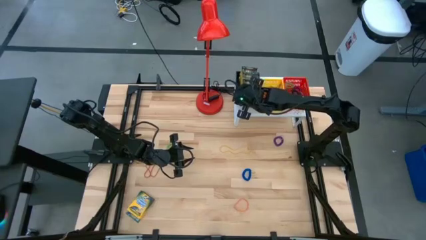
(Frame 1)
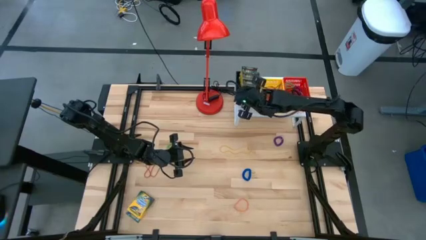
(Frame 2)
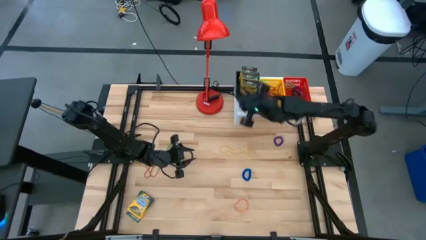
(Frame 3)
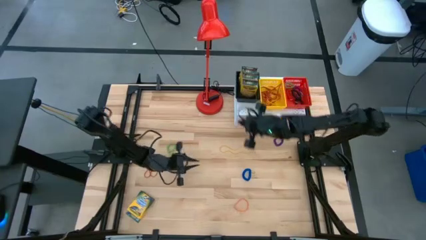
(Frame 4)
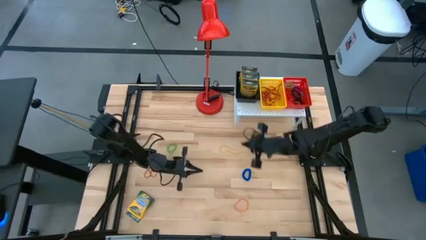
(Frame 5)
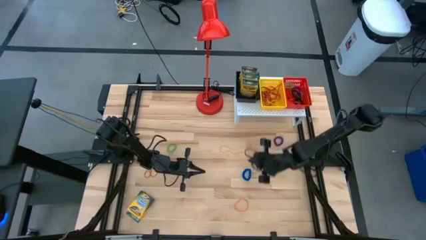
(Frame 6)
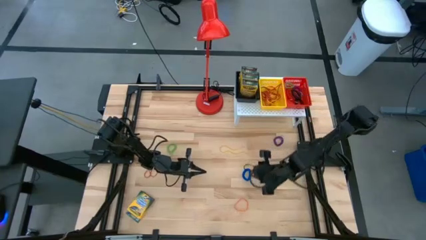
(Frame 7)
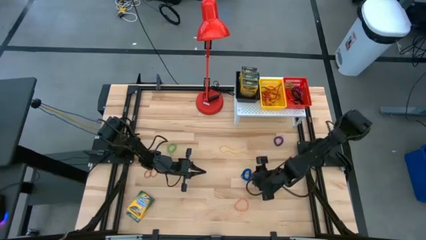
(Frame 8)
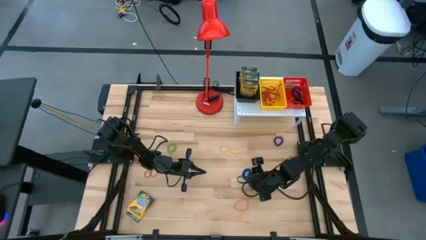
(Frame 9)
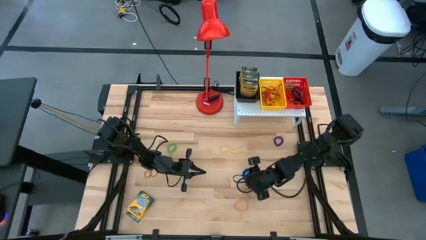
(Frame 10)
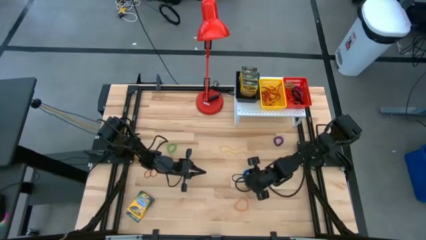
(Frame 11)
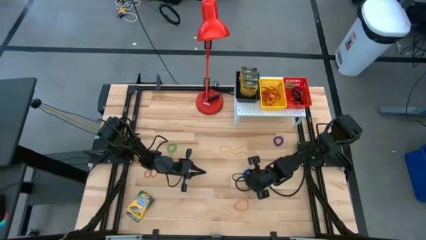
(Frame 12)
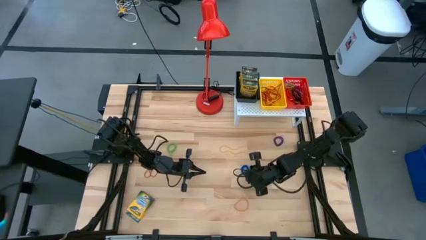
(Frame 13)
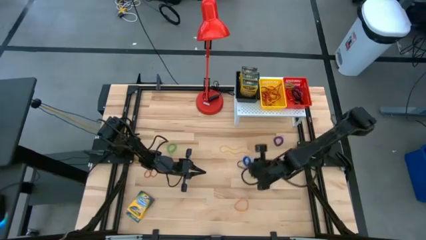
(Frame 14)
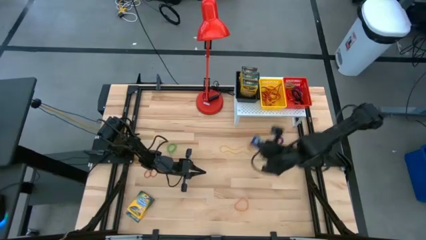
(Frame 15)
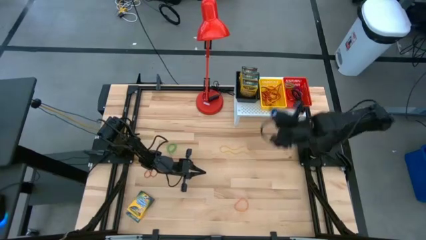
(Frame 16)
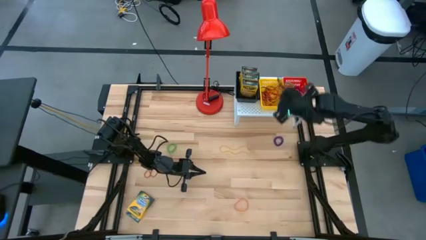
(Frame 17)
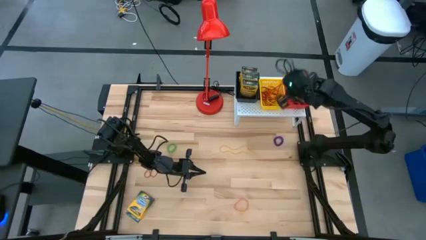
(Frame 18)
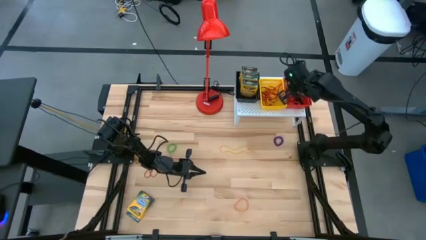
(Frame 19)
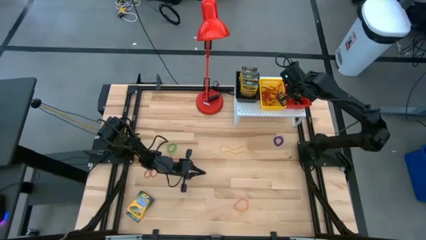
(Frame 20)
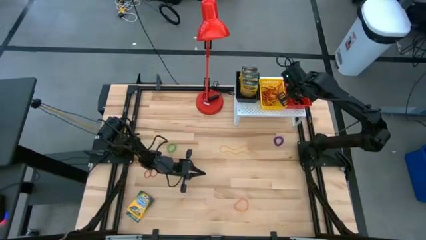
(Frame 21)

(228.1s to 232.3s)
Task: Pick & Place Office Desk Supplies
Put the blue spring keychain into the red bin

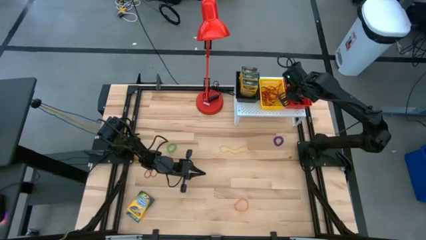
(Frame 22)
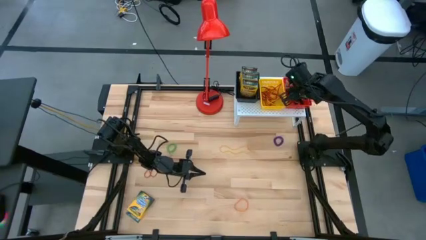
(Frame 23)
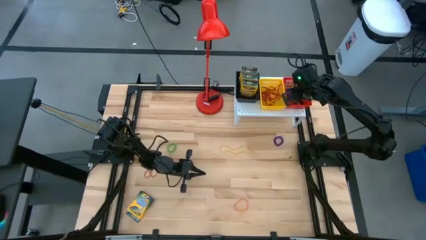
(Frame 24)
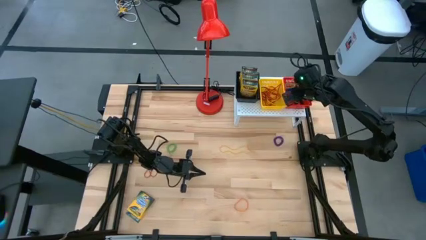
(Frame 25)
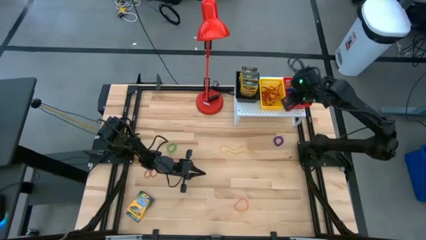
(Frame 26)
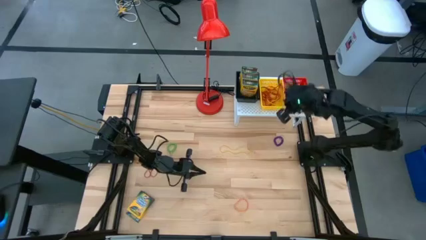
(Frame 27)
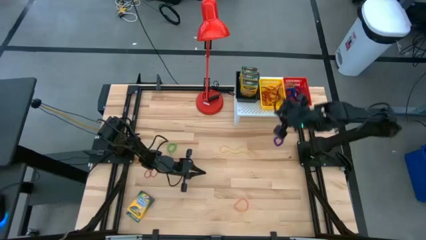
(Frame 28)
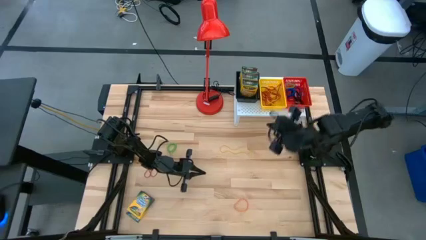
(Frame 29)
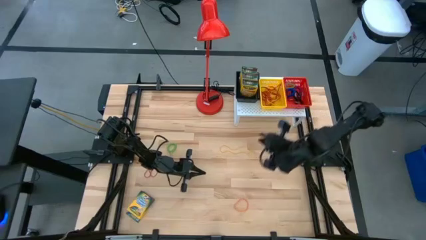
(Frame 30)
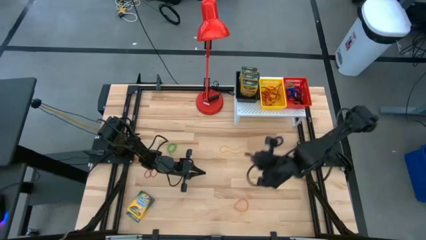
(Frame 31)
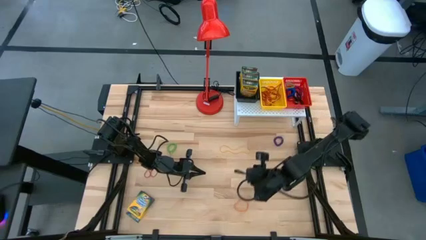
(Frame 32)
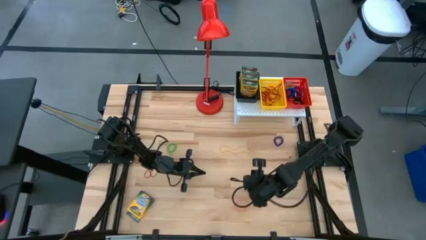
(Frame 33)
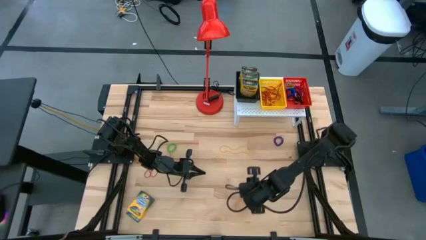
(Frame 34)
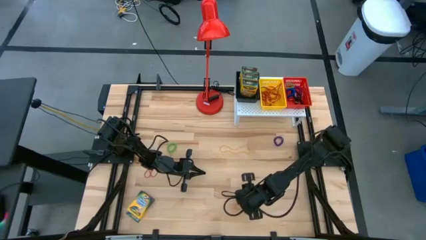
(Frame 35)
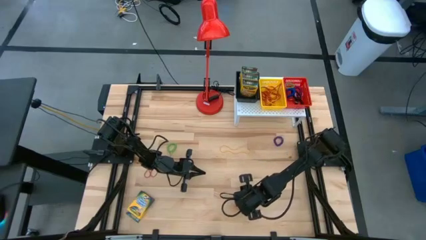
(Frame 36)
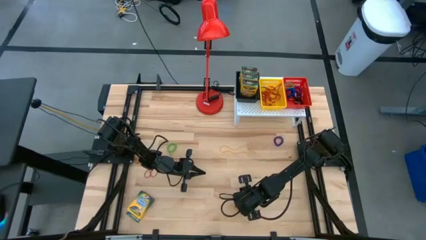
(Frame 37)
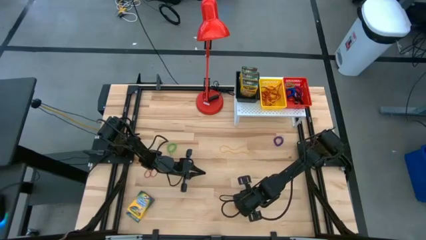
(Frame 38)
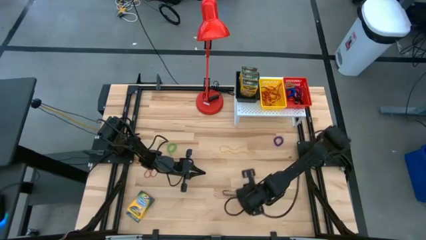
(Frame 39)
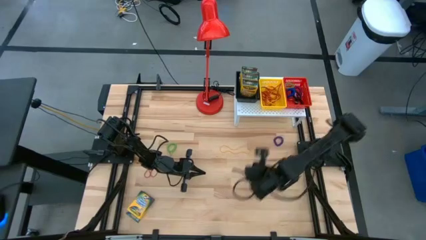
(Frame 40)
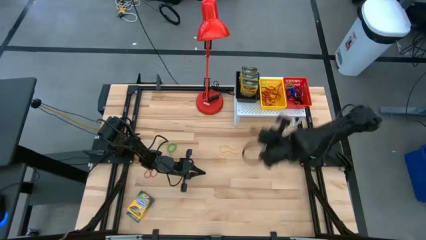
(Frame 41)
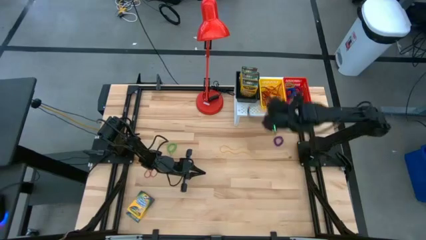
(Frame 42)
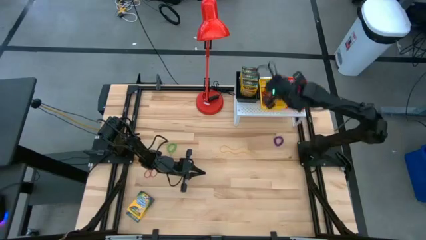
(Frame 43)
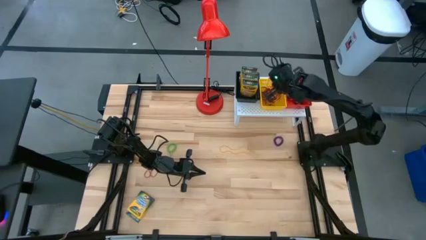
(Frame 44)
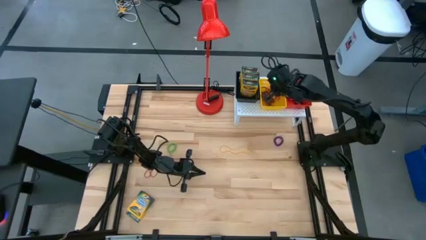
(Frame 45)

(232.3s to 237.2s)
Put the orange rubber band into the yellow bin

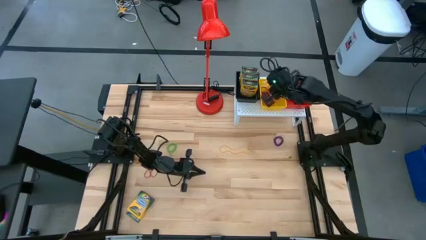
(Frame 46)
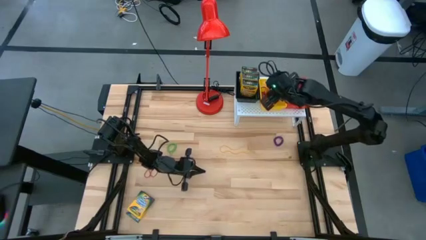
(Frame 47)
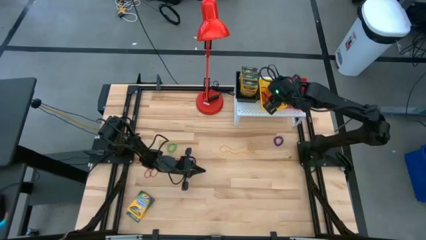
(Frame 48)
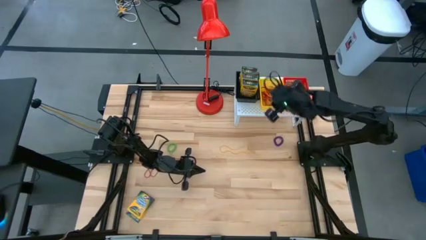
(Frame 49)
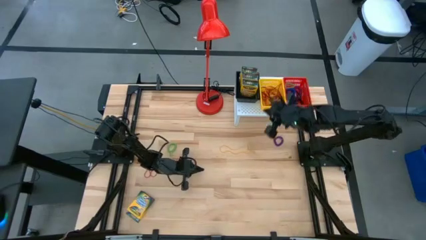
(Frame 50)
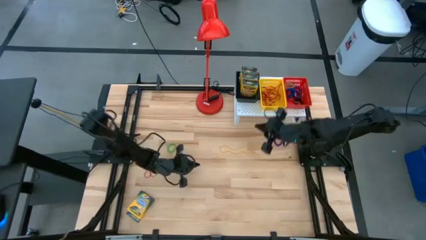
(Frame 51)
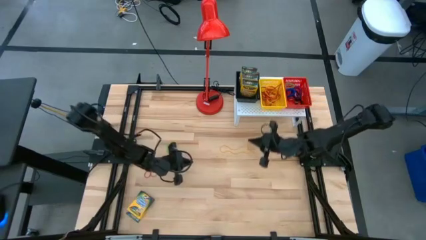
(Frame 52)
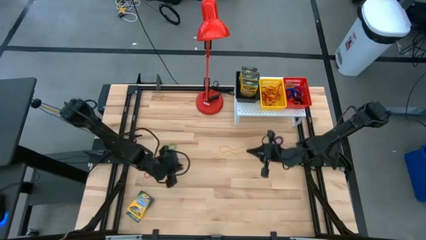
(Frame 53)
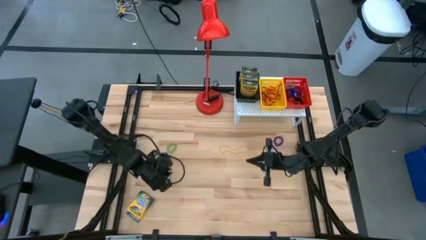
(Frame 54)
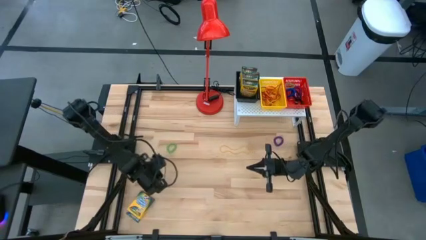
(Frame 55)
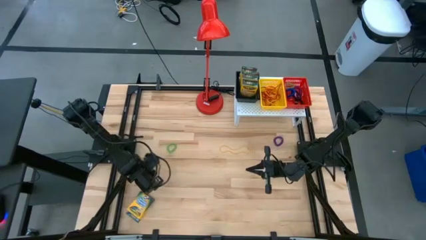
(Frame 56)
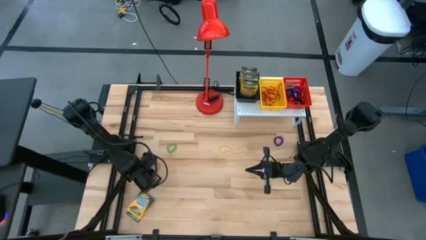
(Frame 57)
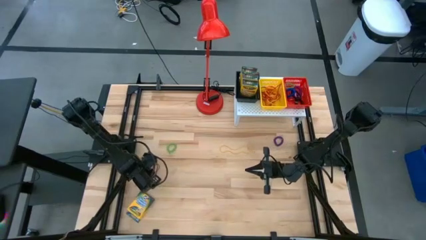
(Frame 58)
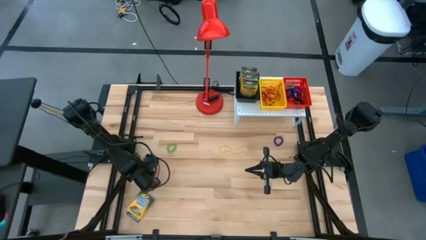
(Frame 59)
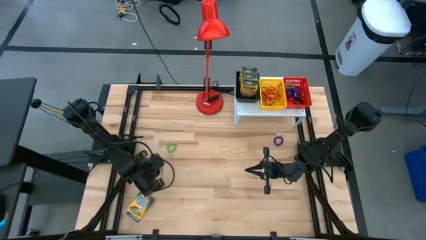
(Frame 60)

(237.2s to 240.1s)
Put the red rubber band into the yellow bin

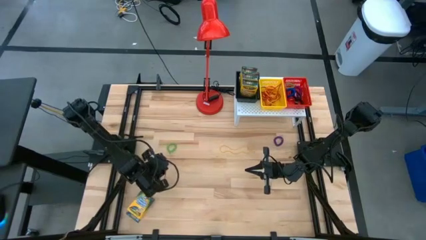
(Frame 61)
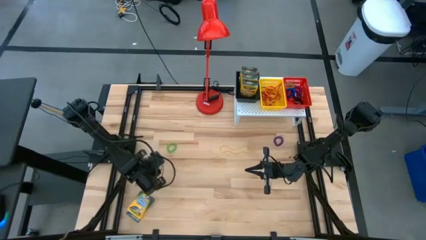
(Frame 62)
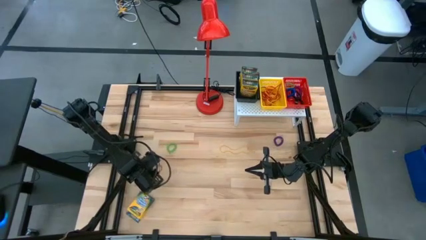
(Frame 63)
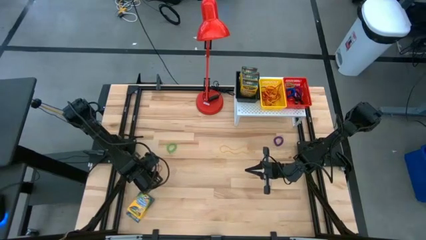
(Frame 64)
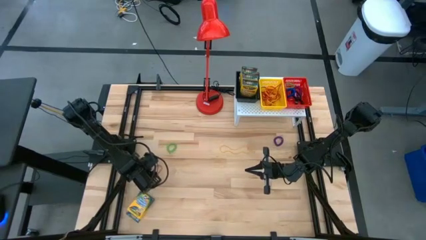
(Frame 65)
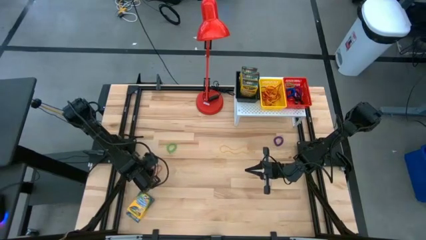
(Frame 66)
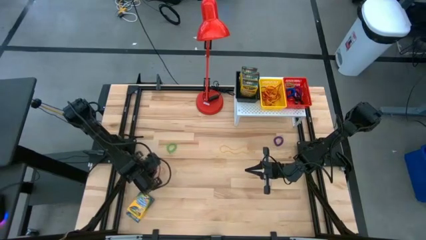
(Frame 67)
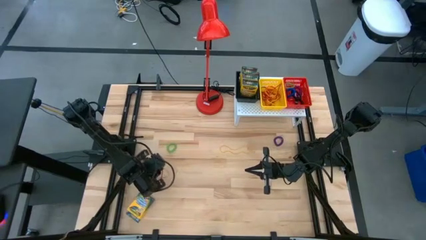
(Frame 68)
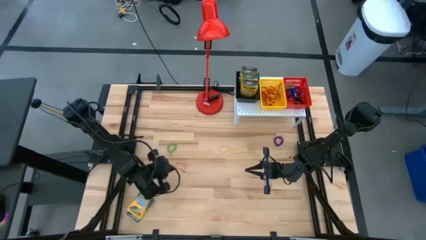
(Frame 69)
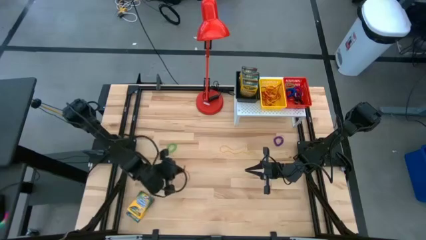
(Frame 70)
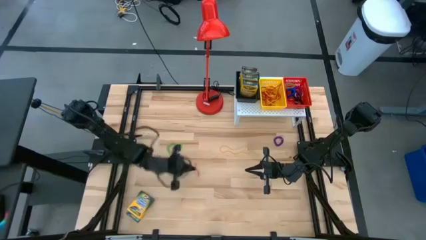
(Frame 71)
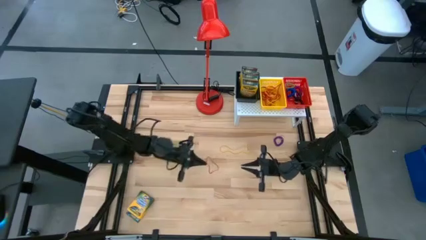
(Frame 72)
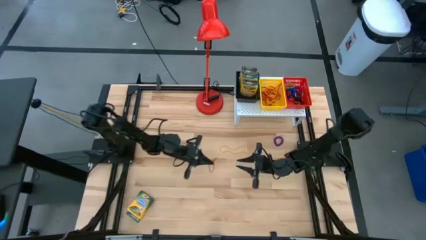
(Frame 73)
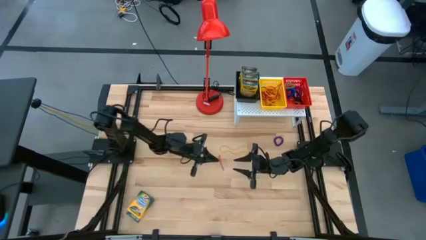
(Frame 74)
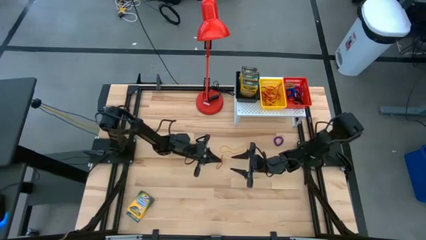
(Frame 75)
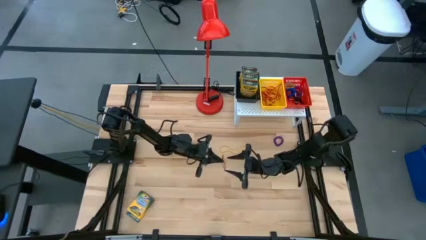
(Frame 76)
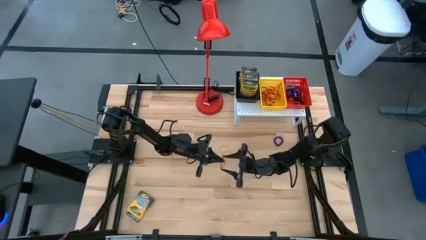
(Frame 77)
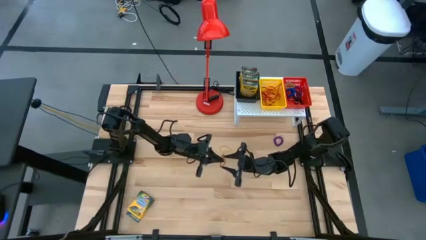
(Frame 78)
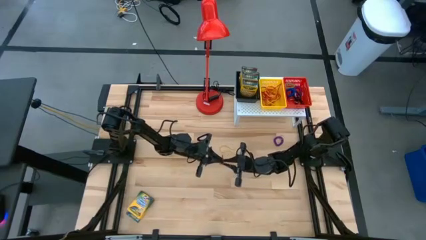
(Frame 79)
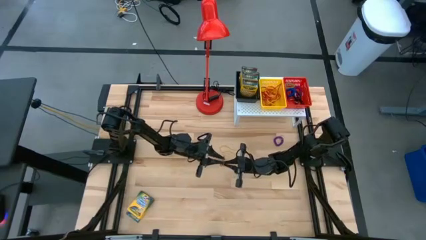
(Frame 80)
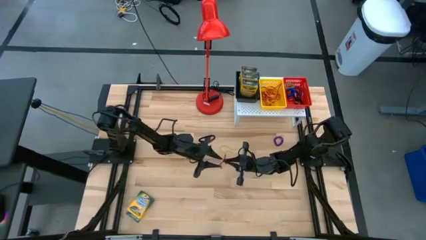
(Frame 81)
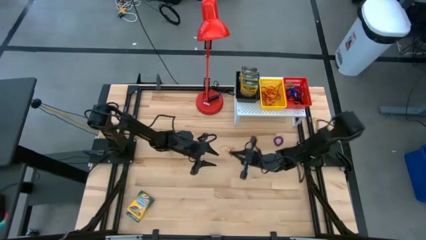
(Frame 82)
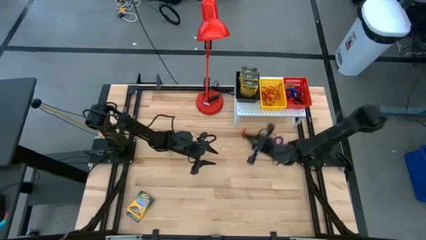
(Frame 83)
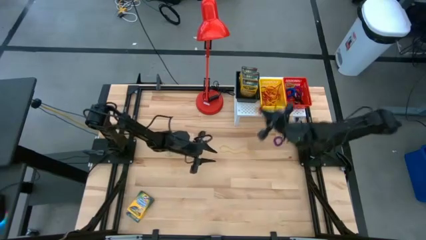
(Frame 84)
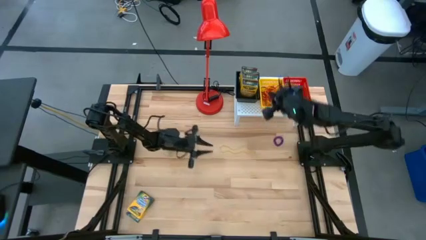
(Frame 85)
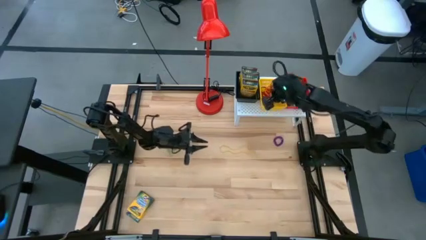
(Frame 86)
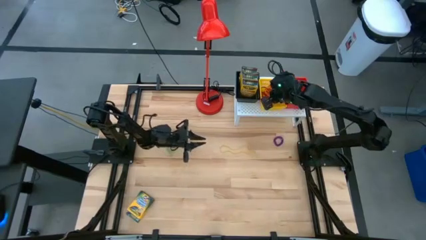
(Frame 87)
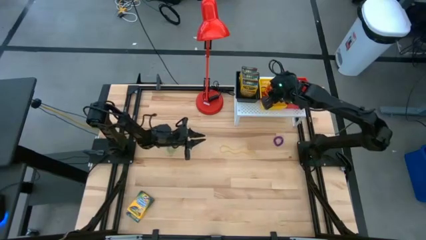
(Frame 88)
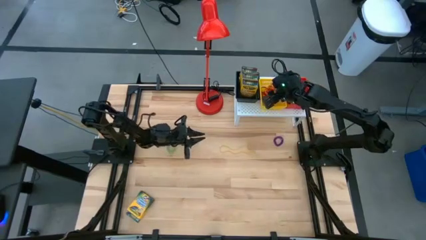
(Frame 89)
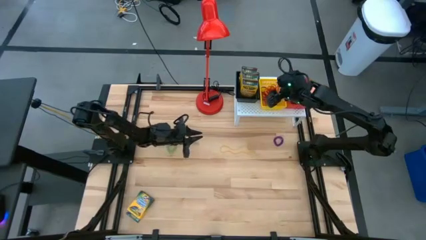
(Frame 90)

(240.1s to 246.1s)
Put the red rubber band into the yellow bin
